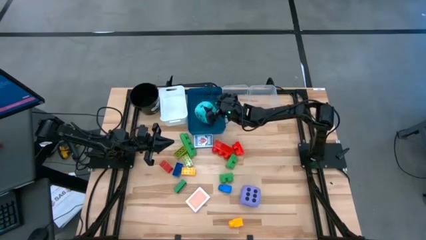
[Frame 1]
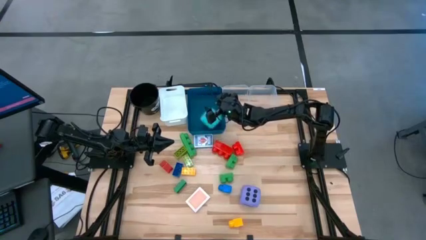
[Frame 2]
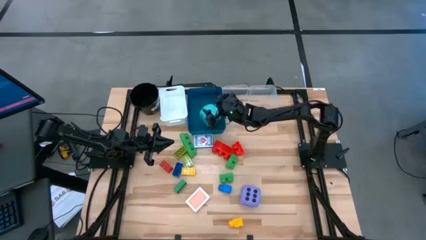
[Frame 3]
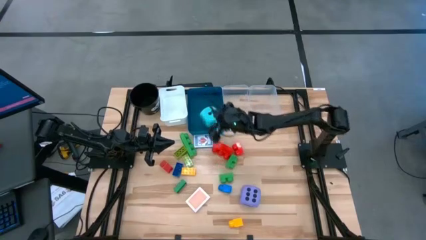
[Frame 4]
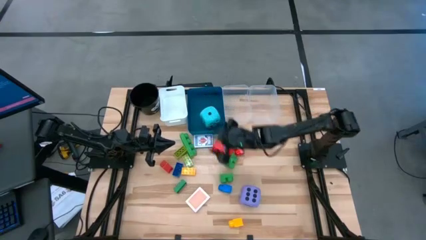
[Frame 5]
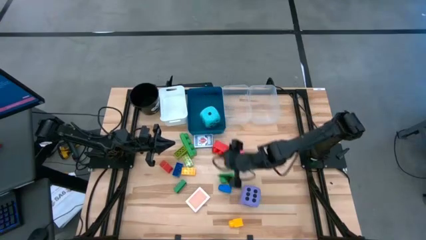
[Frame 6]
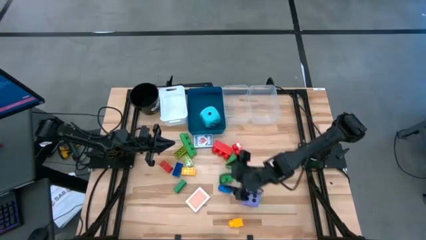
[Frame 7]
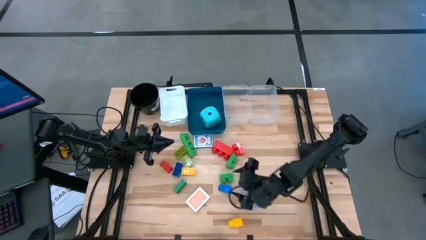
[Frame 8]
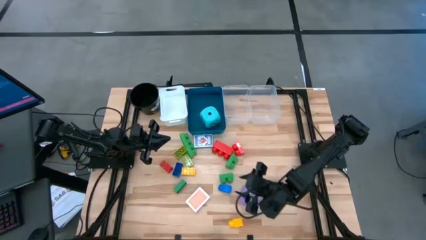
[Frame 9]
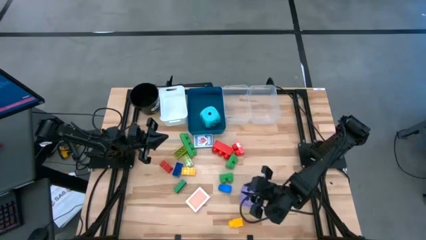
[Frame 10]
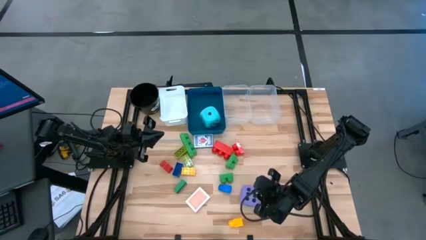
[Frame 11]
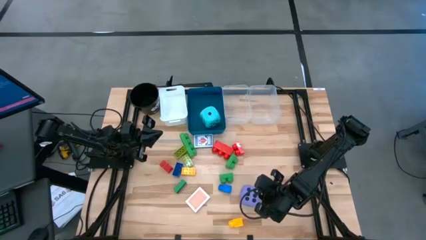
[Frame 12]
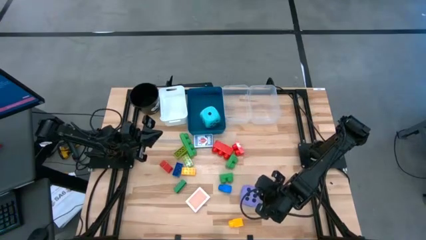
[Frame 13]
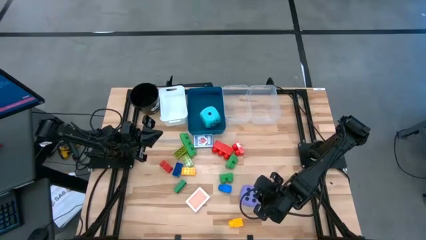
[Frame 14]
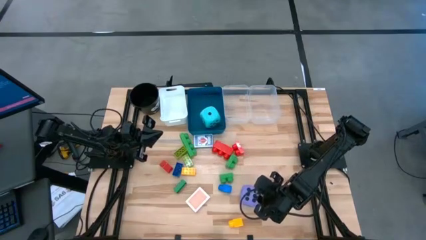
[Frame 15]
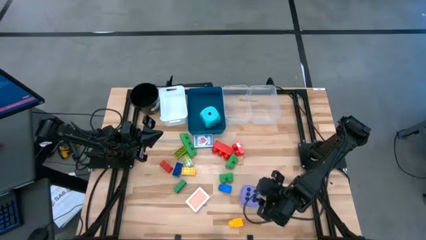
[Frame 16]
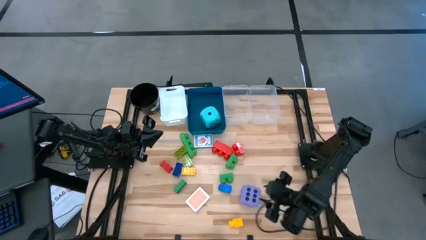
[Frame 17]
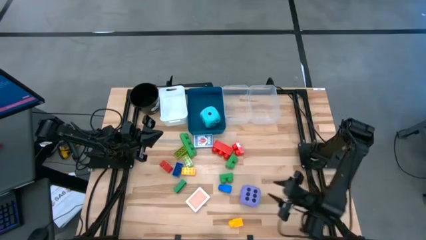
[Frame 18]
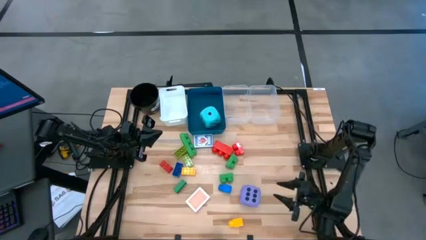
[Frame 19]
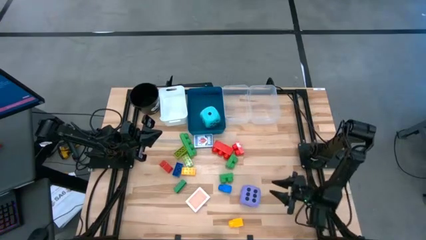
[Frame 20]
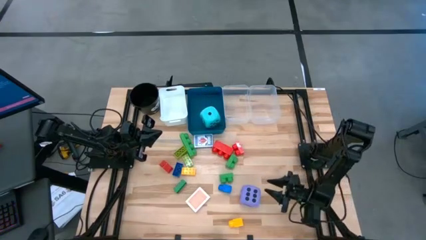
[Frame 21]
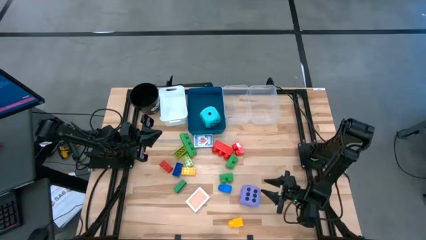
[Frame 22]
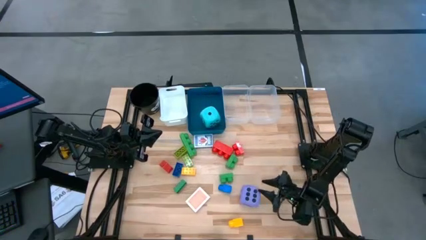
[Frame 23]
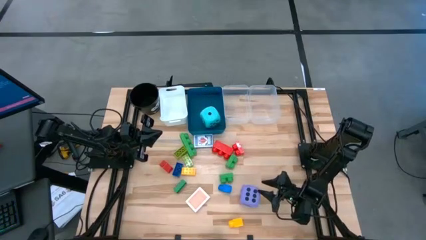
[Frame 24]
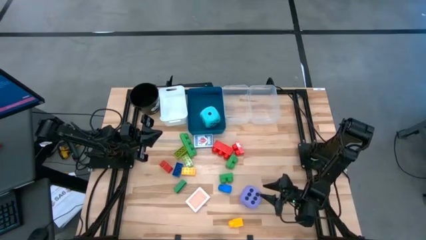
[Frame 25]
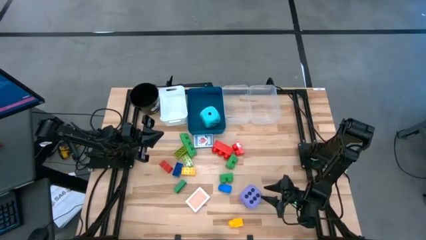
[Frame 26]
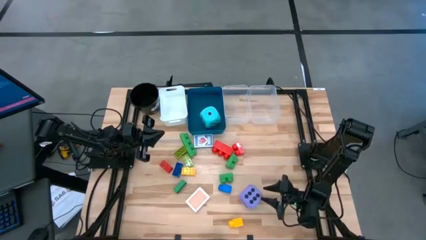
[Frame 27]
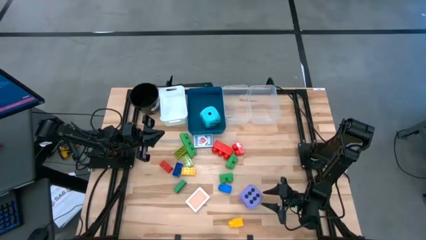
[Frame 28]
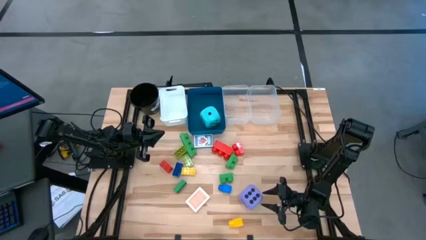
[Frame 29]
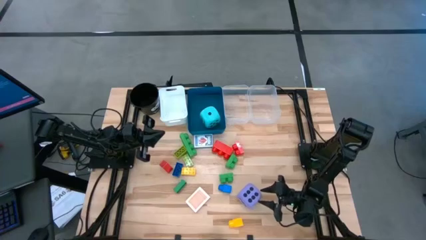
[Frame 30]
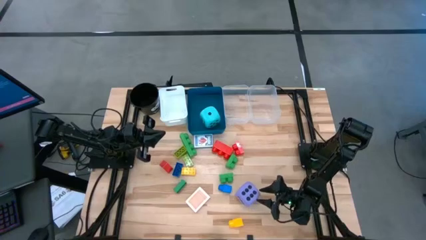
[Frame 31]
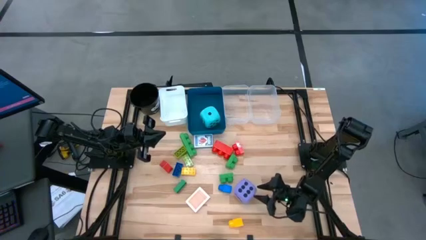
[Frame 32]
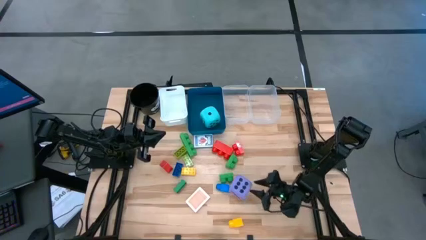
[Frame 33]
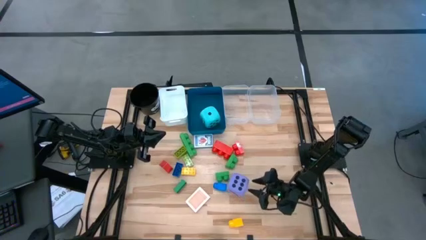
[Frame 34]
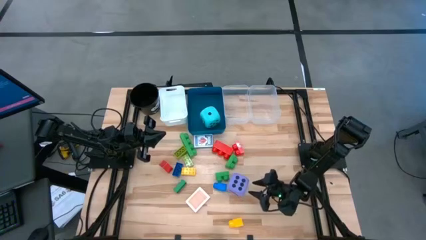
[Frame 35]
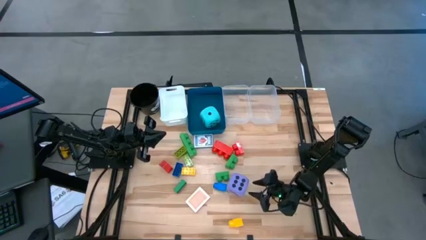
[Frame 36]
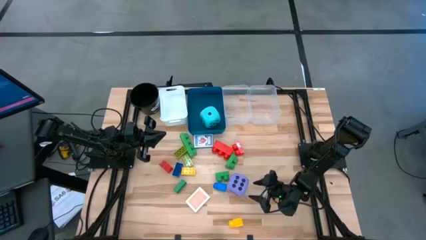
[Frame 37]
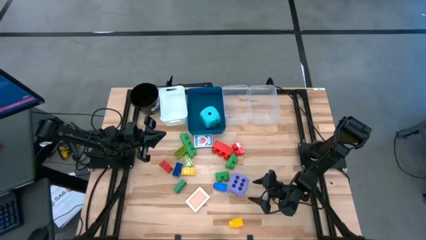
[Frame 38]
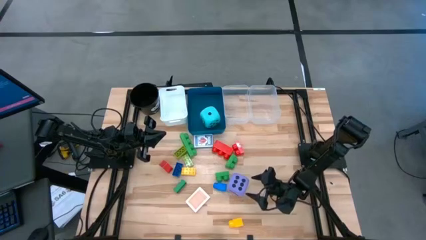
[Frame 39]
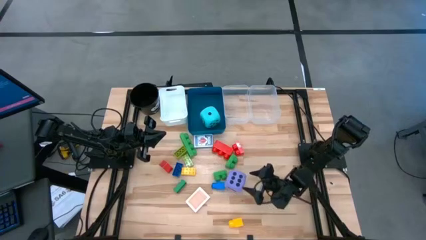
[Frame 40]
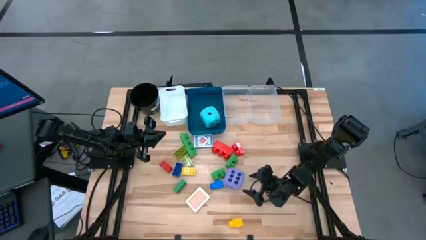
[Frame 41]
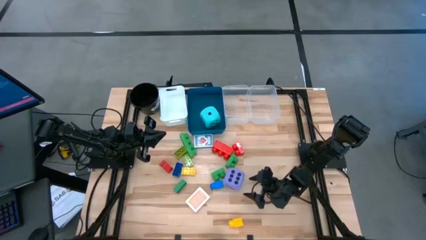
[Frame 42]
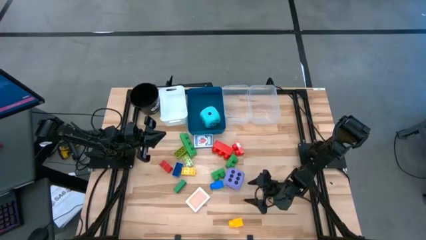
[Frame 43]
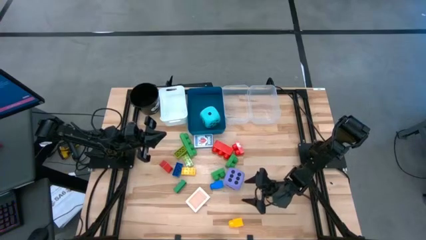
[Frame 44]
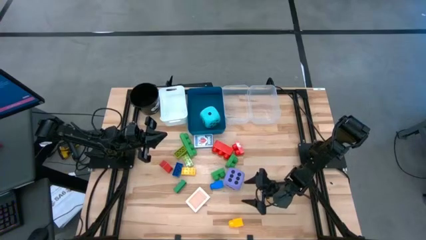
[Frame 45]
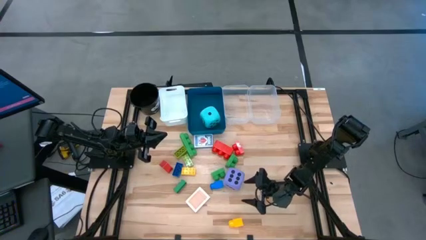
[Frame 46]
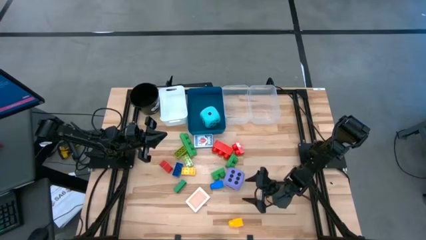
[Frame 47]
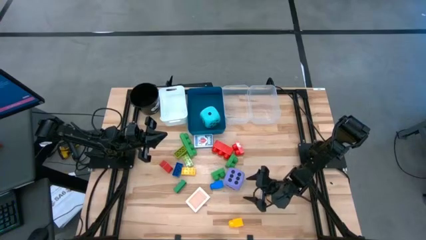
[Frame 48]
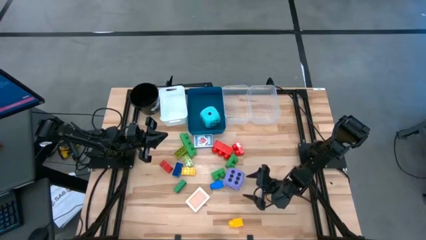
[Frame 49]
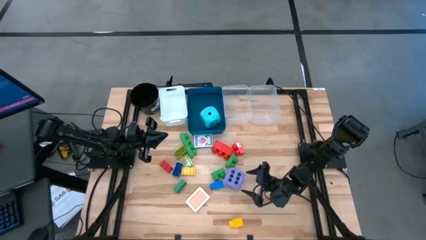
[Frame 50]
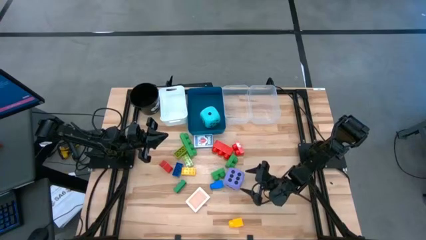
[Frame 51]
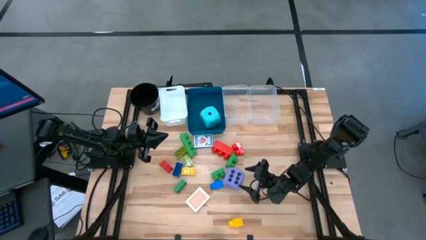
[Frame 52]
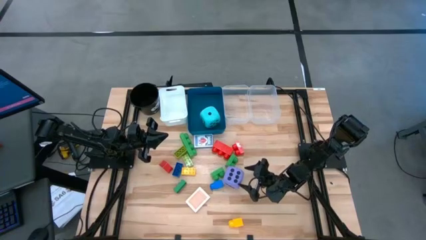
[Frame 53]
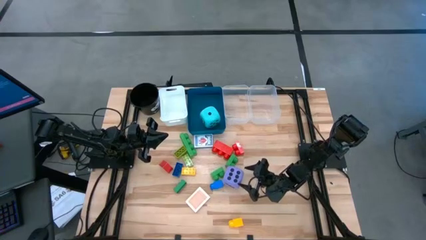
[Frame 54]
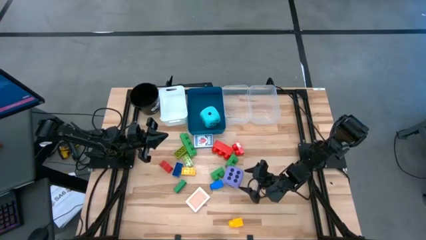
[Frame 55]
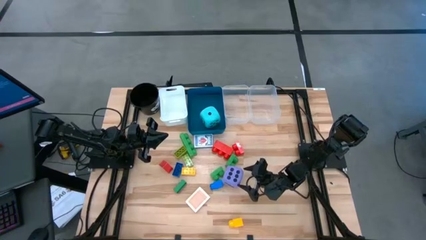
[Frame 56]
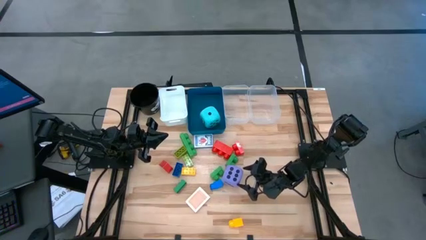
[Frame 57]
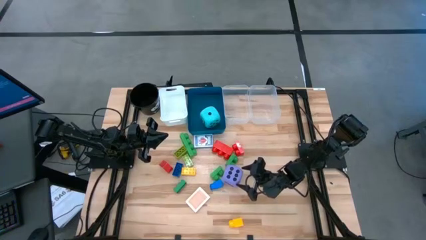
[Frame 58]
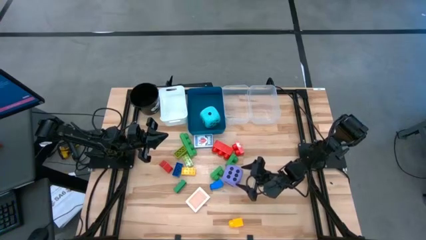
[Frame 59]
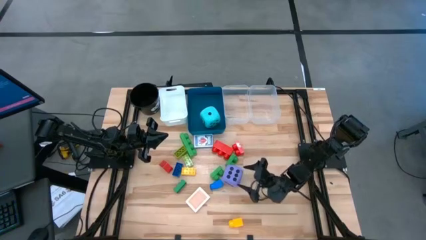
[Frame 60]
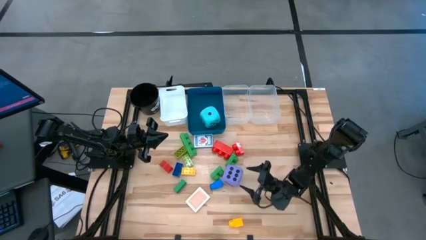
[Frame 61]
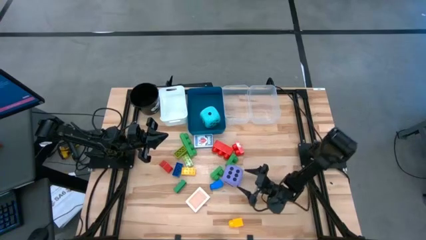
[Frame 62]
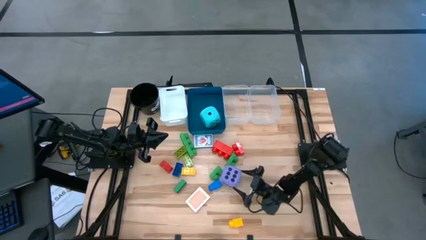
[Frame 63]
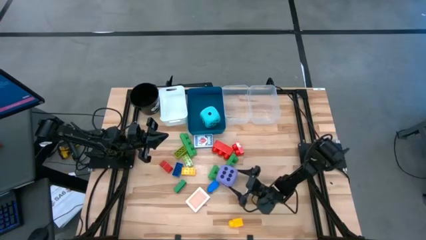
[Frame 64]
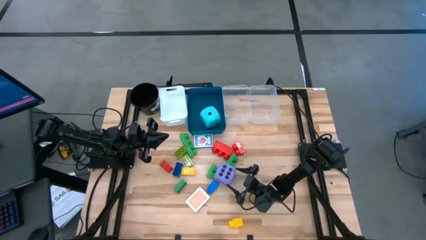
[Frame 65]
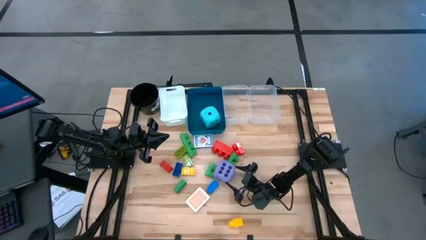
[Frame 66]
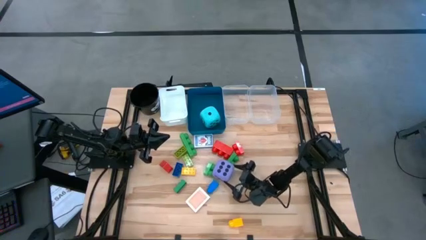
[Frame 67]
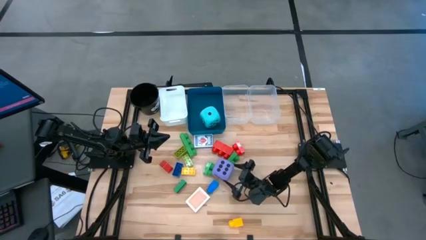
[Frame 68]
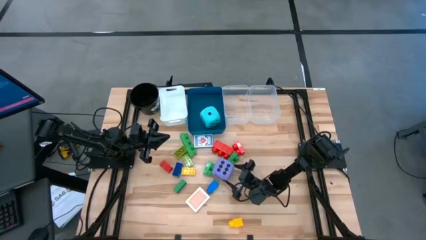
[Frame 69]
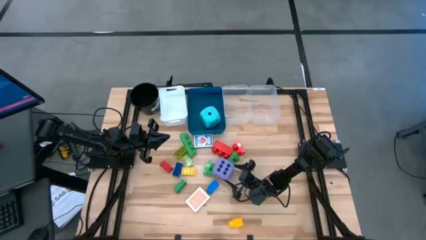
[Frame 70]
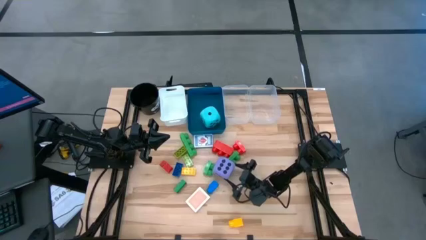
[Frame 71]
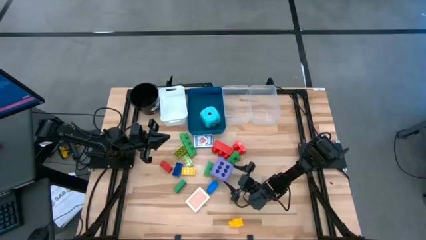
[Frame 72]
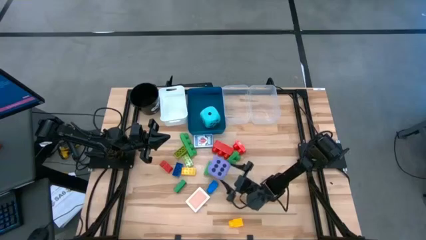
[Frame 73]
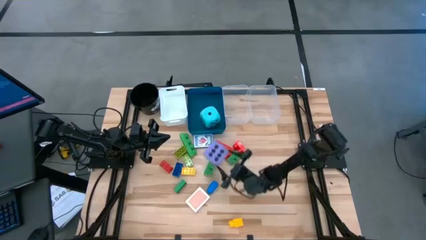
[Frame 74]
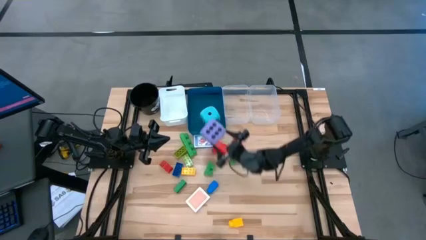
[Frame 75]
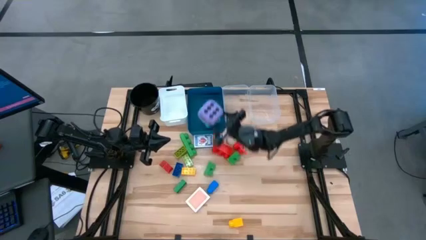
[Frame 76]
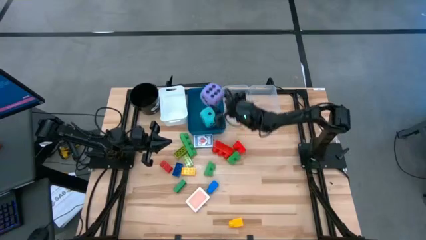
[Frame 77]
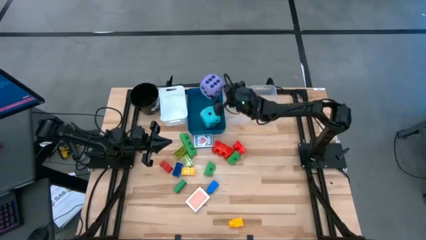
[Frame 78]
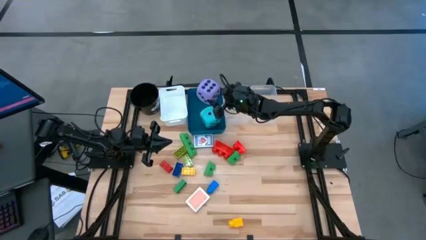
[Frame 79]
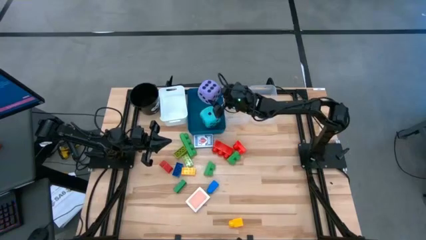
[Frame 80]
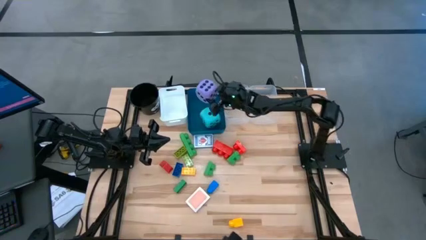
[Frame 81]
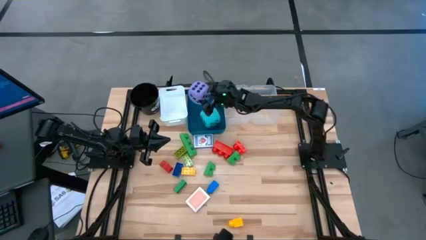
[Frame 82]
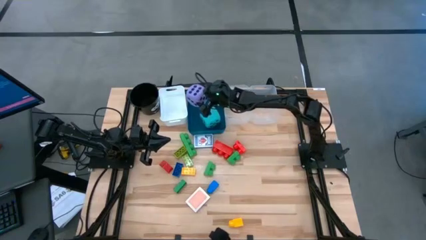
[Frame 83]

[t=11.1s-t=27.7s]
Task: Pick & Place Toys
Put the purple dice into the blue bin
